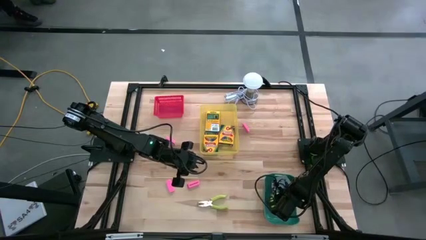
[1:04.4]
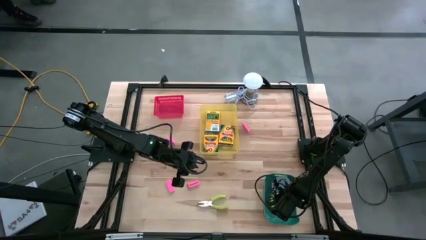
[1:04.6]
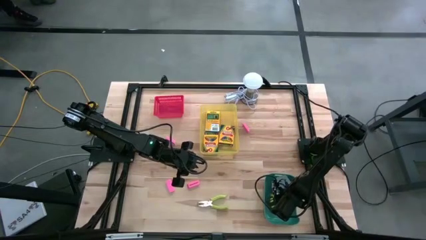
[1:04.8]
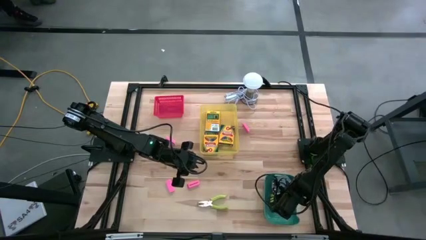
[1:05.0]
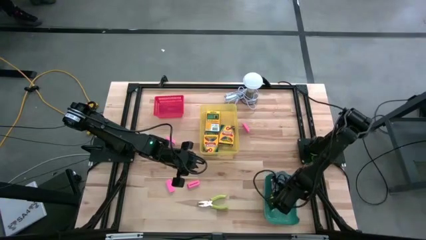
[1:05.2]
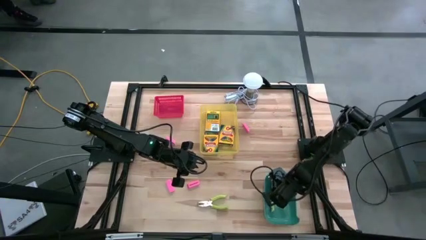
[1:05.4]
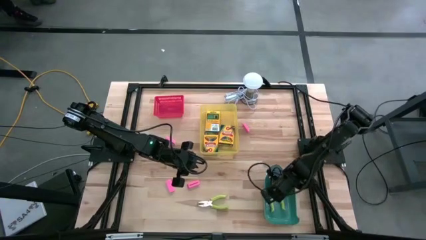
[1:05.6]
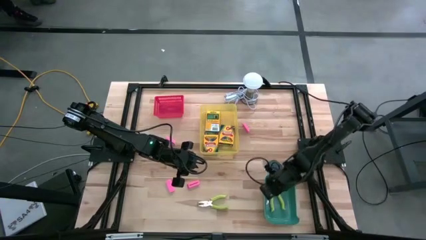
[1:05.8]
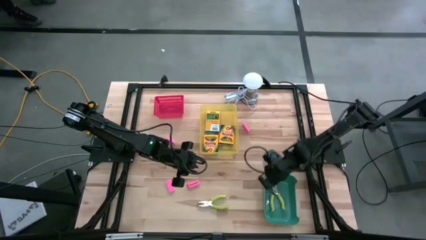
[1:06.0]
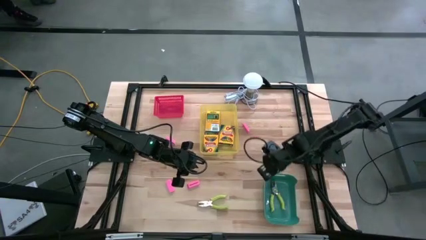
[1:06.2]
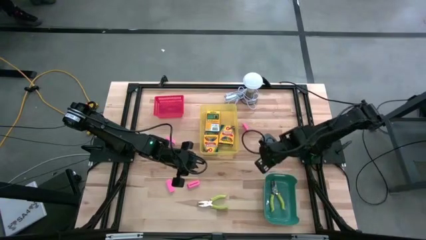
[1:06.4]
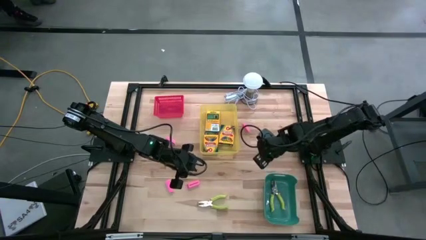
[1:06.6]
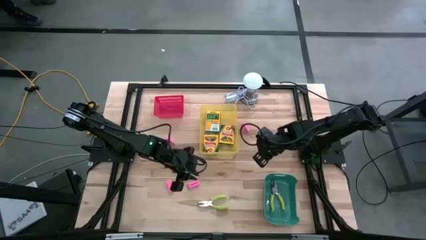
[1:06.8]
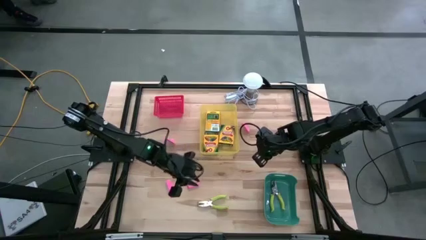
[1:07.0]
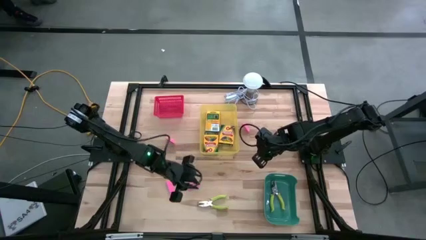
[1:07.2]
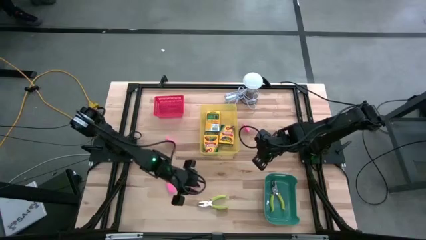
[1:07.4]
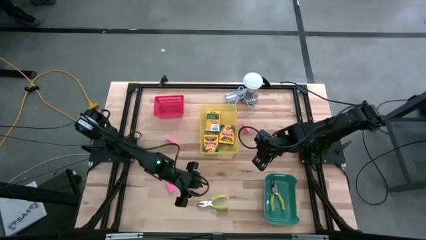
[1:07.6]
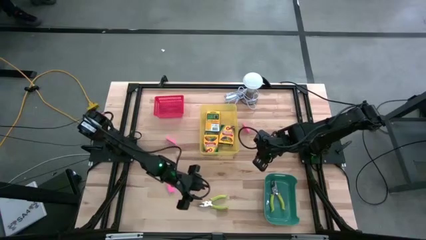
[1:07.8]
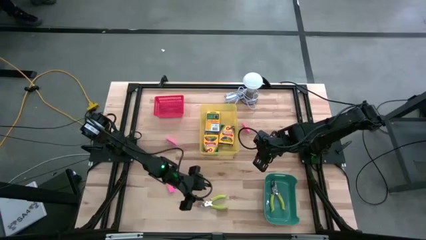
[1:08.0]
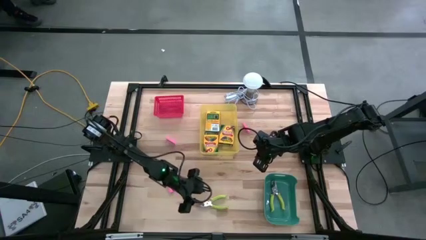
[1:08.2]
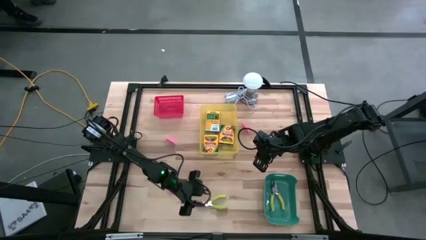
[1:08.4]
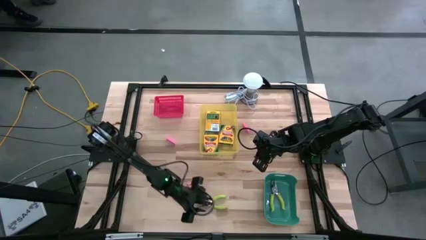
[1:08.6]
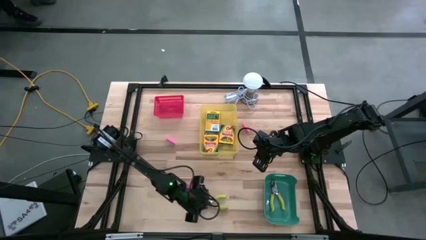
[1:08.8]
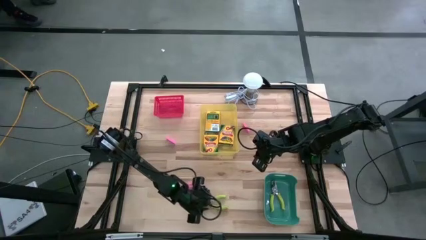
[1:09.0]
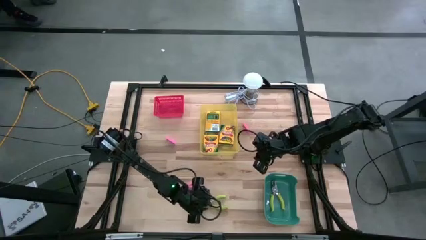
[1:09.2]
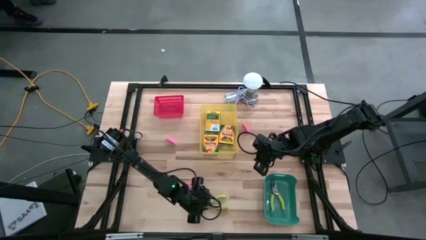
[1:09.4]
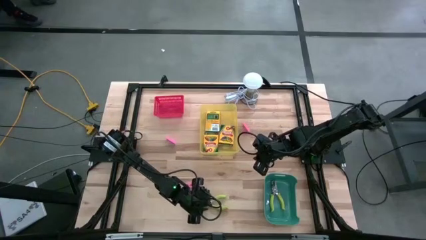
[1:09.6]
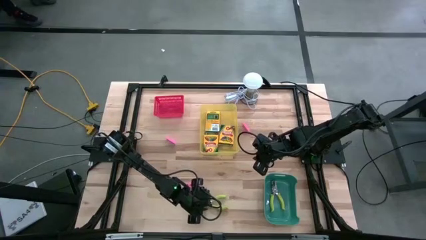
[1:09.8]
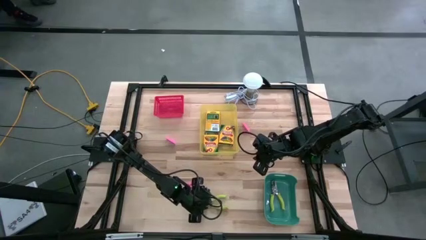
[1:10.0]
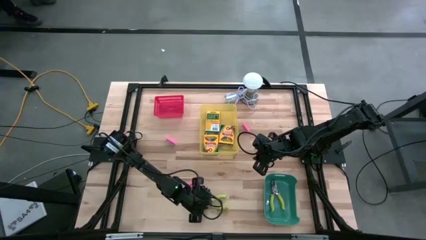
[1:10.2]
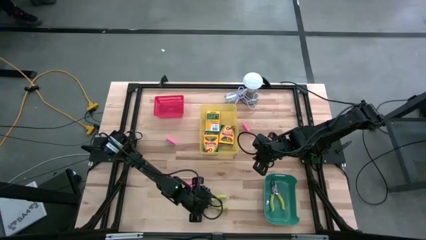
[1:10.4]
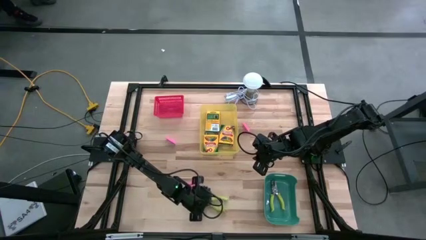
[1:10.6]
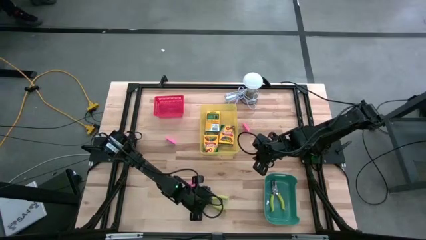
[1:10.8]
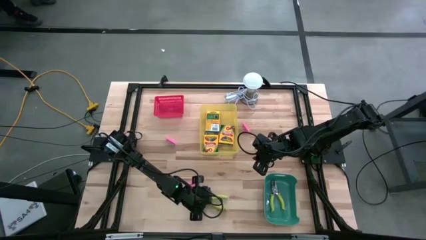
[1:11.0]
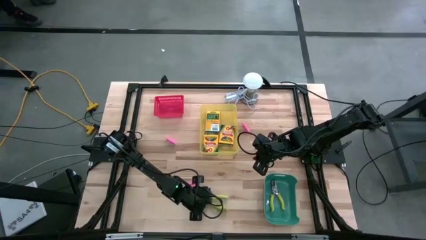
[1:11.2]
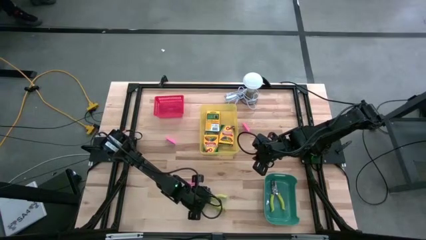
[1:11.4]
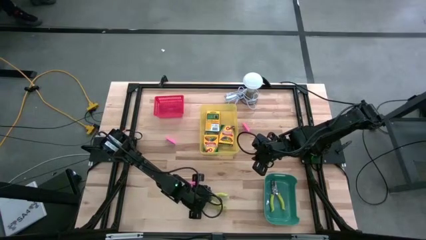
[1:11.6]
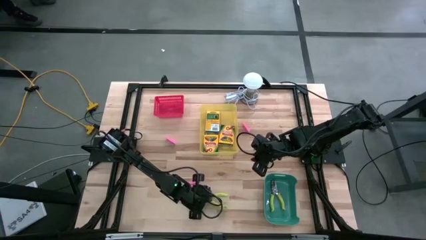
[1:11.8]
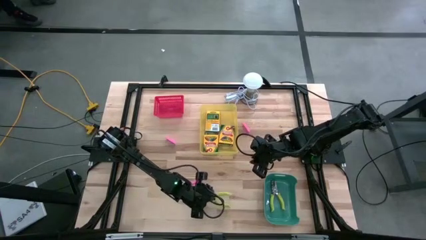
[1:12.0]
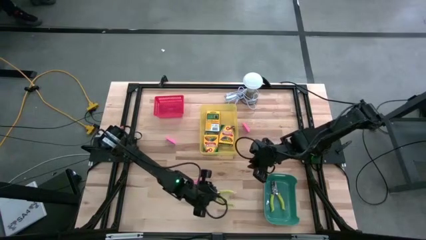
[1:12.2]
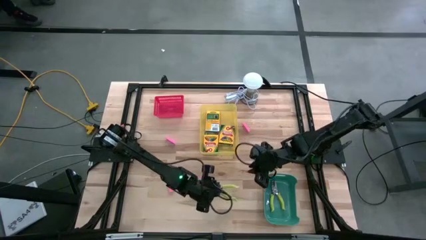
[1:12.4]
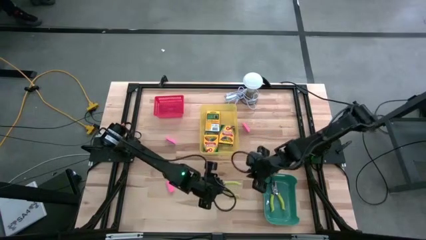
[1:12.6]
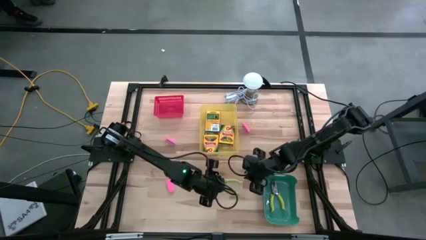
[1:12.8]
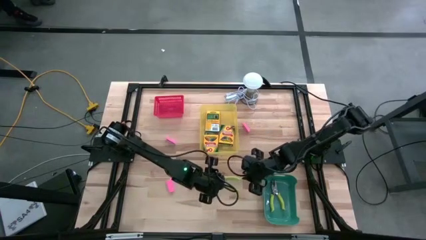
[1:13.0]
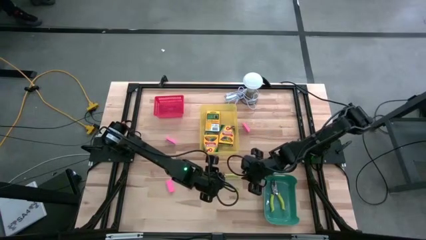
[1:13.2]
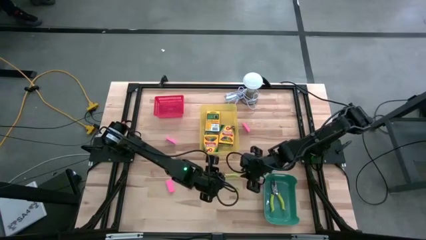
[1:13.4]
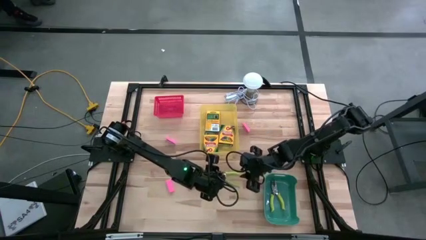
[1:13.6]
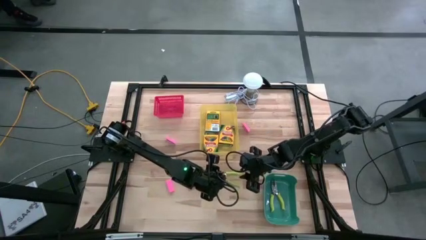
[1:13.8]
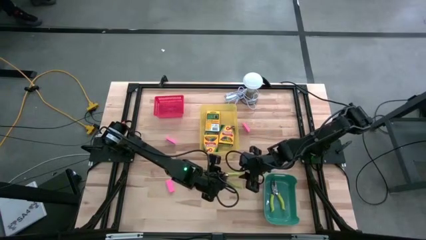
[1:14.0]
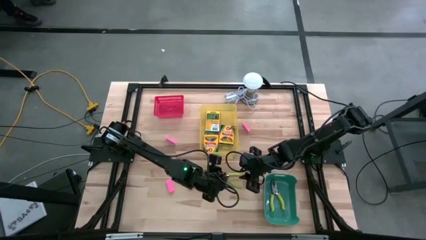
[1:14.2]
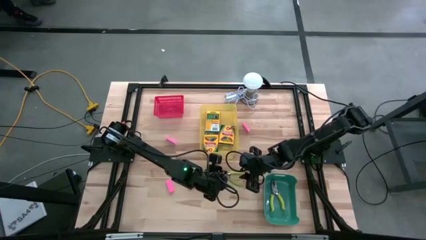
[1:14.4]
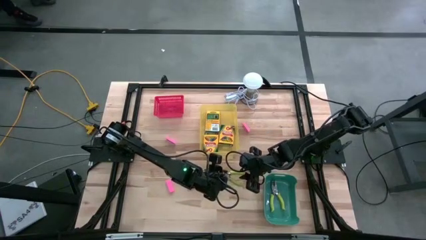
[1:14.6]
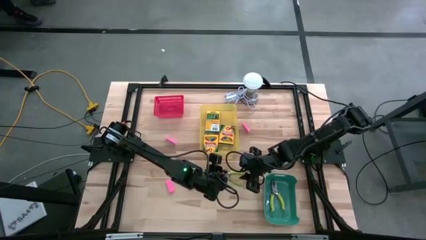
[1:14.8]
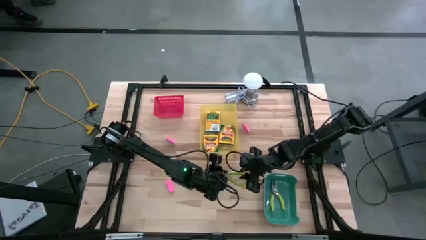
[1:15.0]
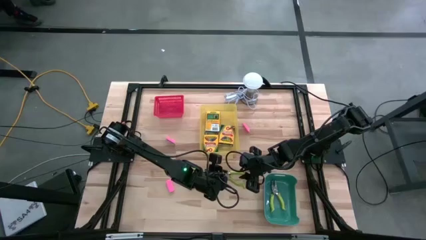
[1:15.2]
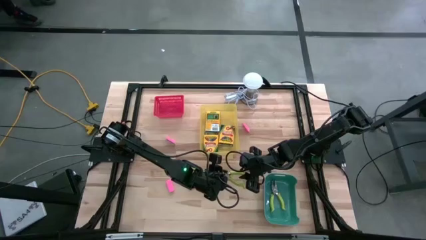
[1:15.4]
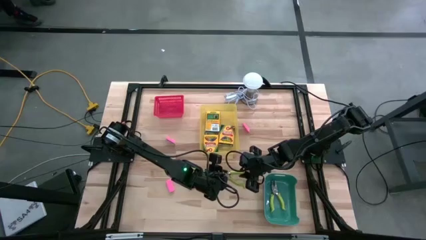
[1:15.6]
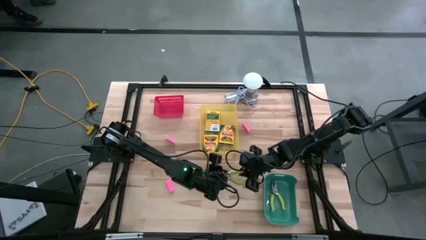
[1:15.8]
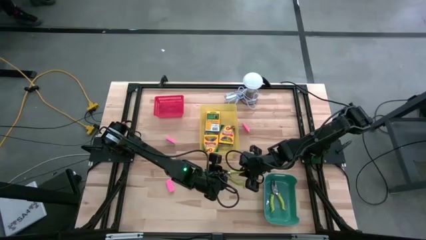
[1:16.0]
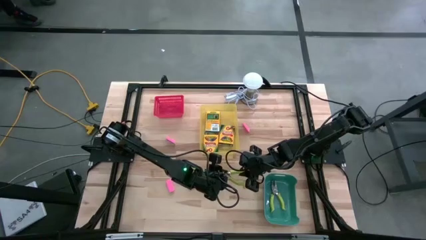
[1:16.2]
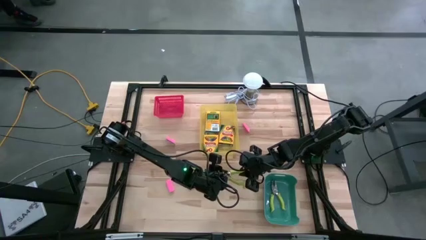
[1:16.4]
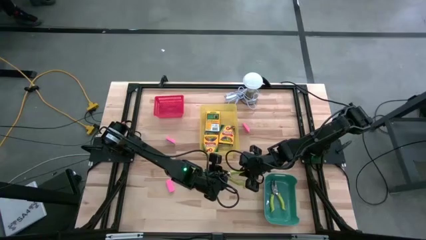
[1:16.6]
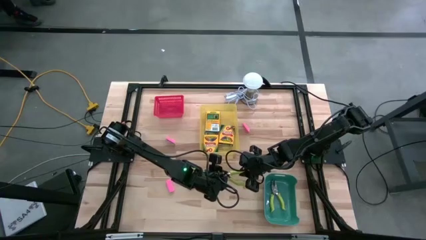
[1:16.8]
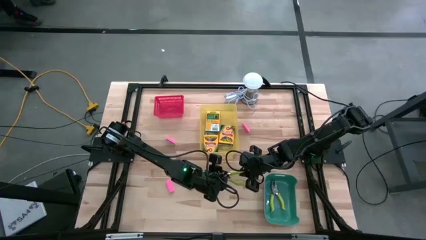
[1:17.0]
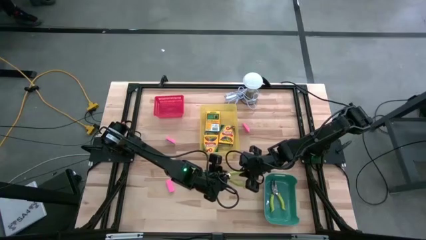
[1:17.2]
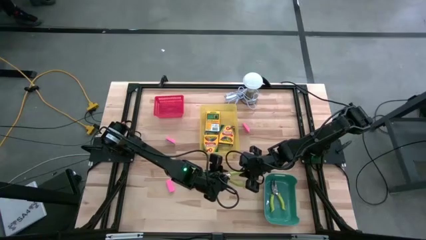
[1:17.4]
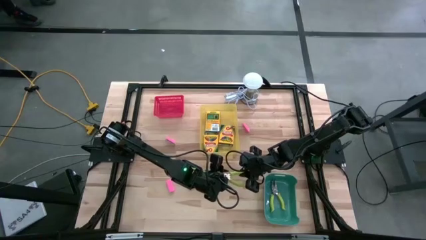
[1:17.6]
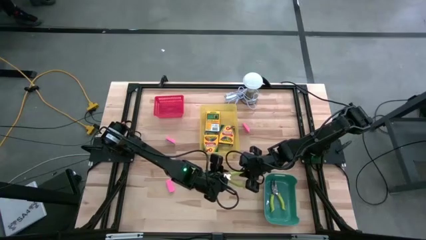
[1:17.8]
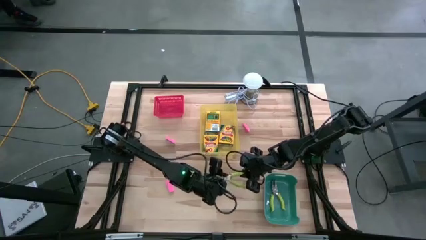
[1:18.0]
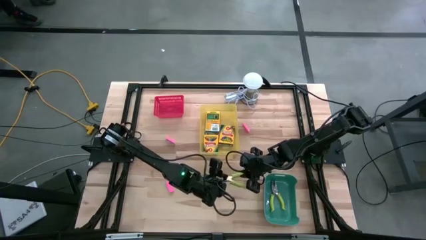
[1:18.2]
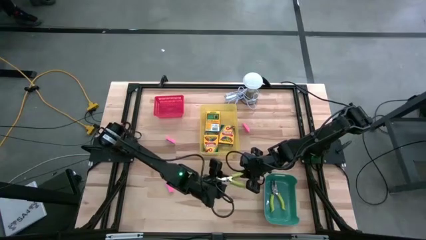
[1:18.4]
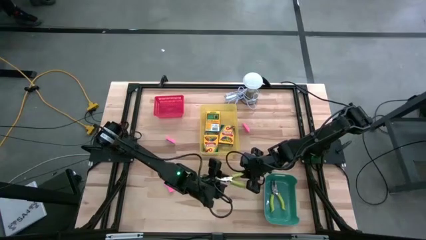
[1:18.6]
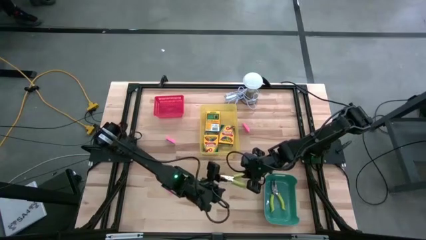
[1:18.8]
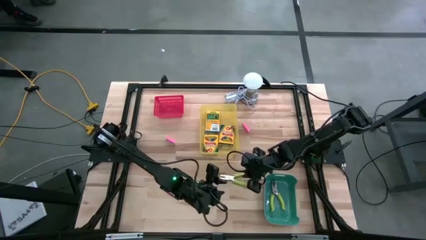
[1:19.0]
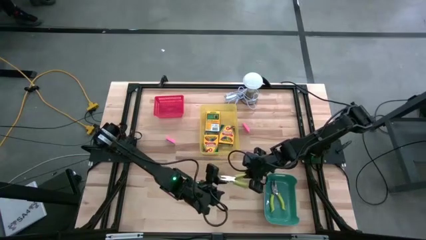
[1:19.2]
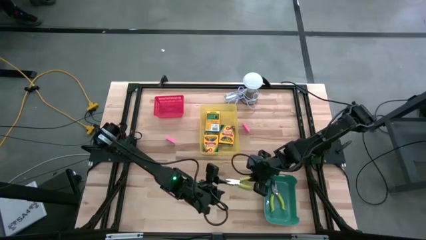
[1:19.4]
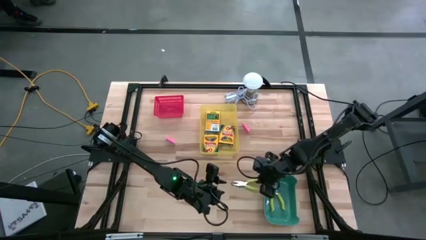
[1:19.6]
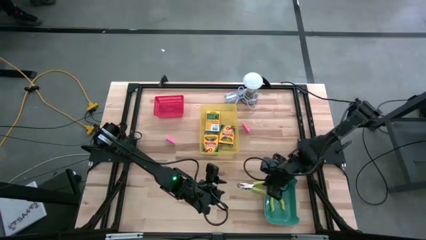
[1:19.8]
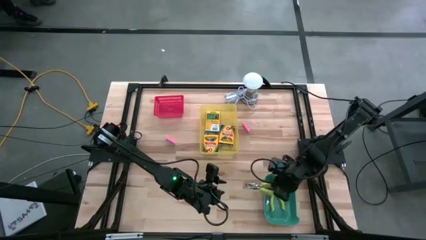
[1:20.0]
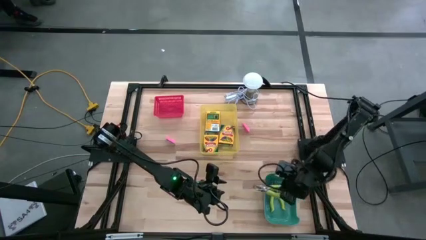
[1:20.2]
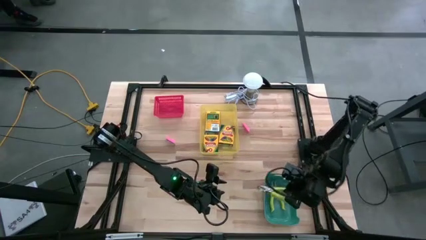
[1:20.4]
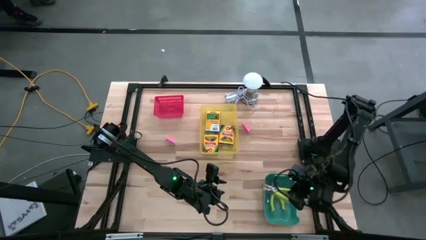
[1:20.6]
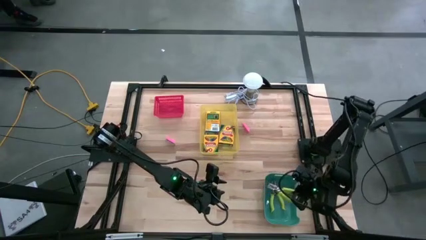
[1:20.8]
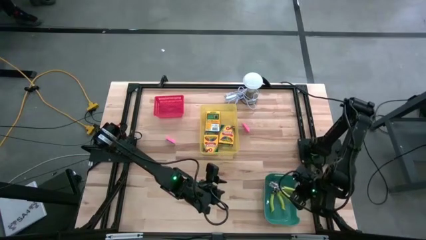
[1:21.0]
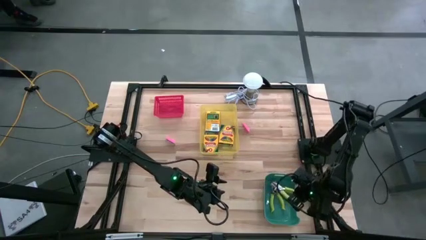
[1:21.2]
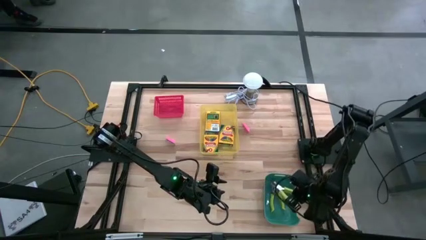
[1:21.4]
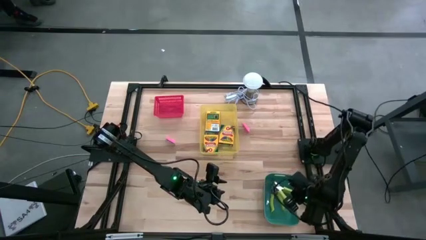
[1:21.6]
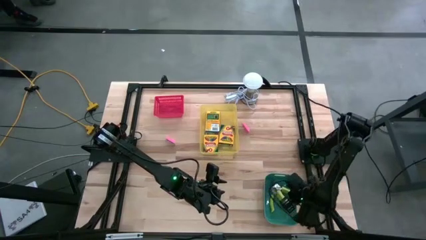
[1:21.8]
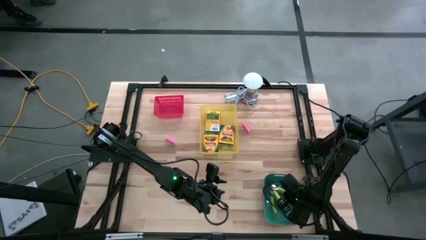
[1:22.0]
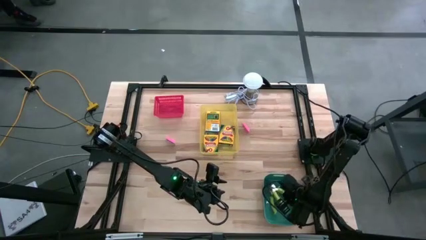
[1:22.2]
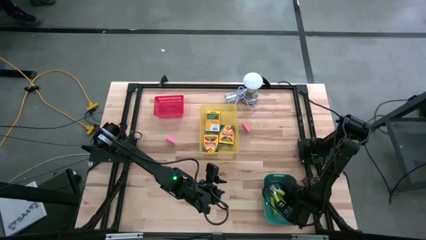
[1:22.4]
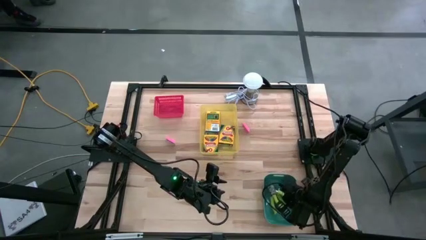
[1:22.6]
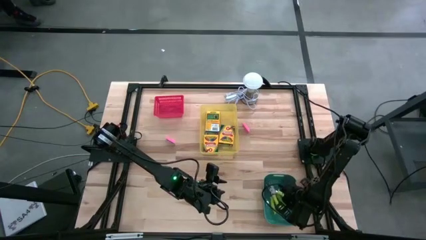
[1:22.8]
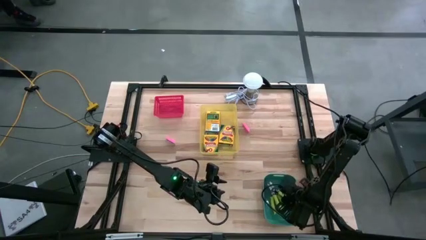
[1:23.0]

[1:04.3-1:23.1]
Task: Pick & Place School Supplies
Put the light green pliers into the blue bin
